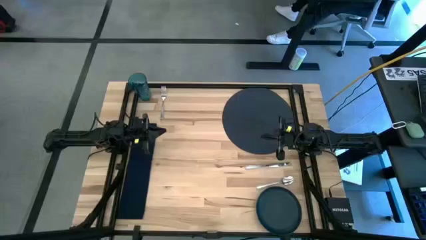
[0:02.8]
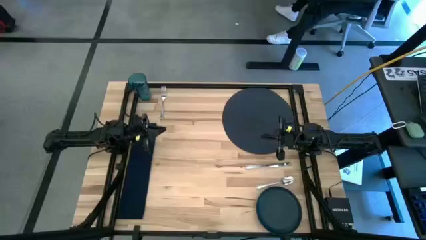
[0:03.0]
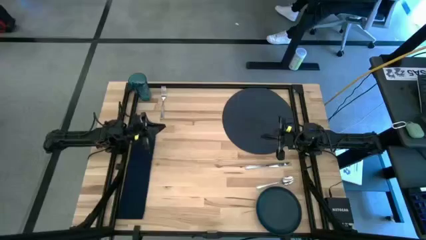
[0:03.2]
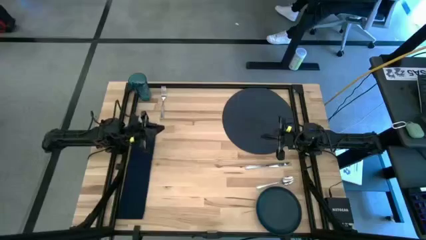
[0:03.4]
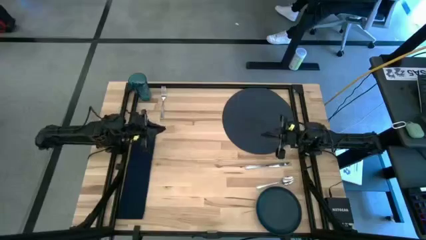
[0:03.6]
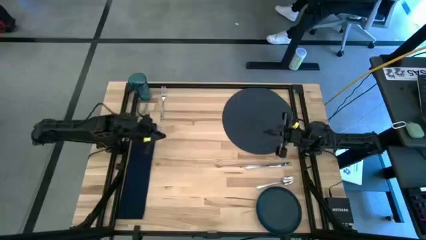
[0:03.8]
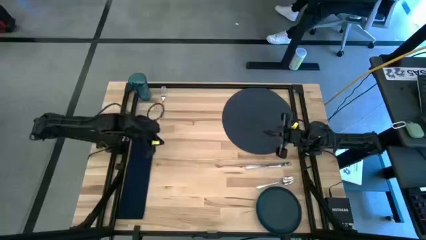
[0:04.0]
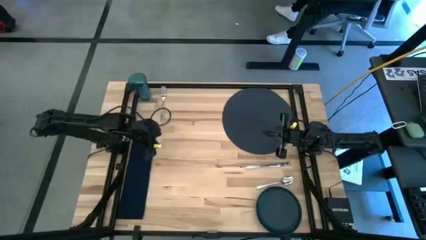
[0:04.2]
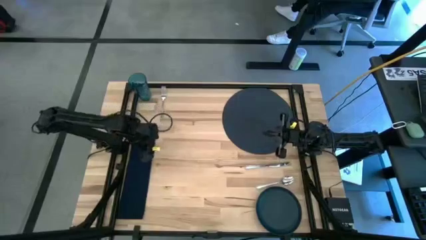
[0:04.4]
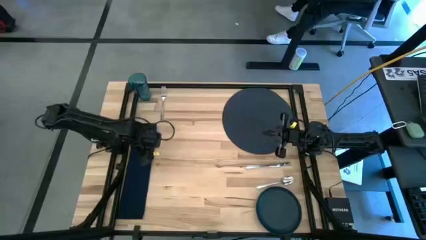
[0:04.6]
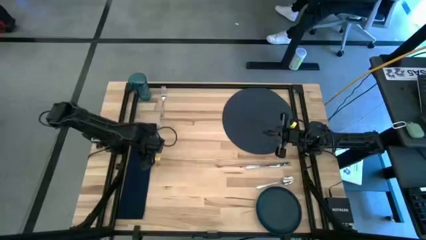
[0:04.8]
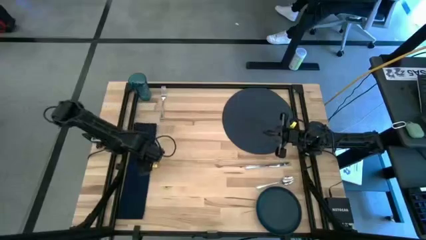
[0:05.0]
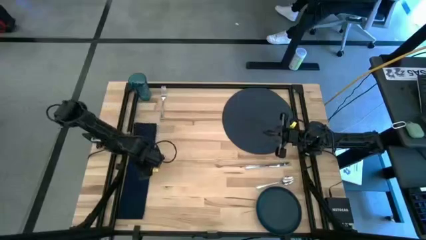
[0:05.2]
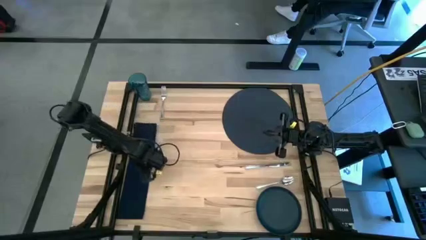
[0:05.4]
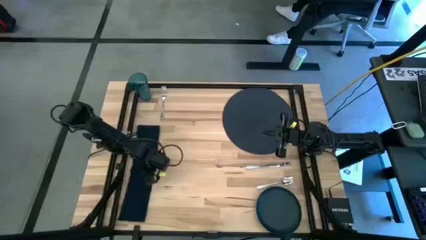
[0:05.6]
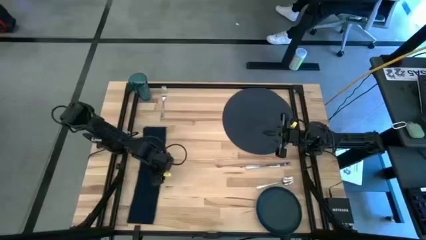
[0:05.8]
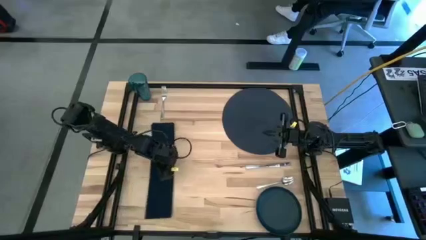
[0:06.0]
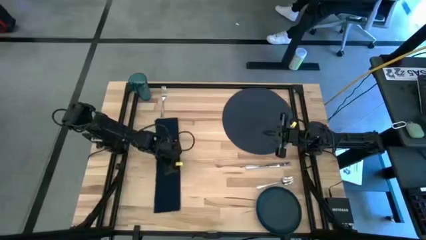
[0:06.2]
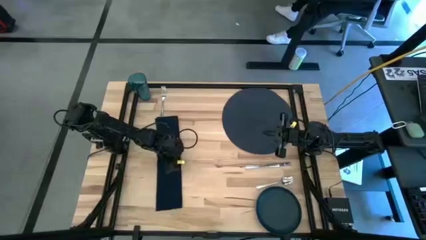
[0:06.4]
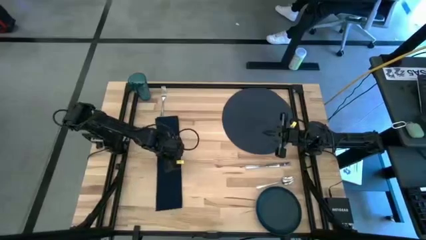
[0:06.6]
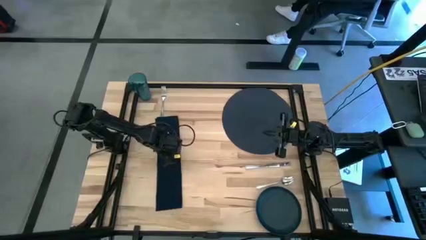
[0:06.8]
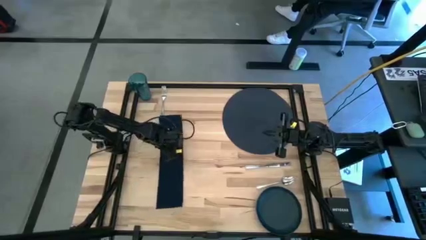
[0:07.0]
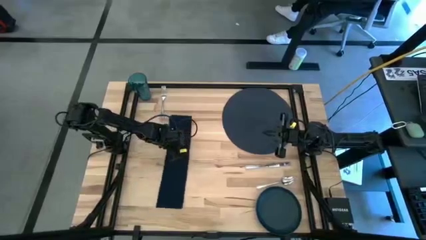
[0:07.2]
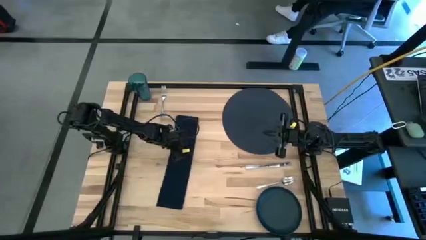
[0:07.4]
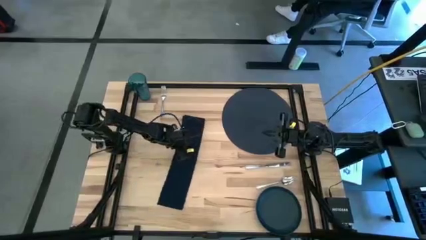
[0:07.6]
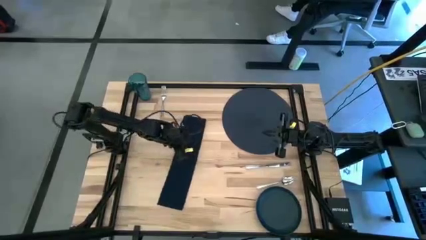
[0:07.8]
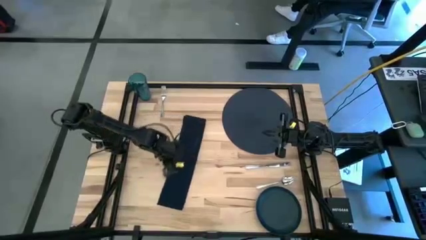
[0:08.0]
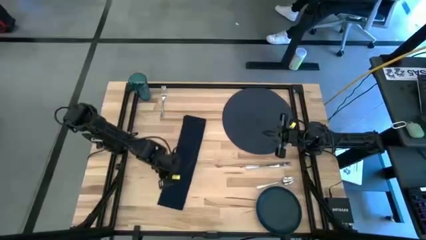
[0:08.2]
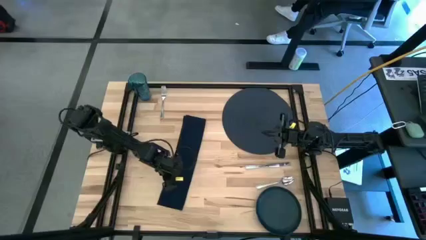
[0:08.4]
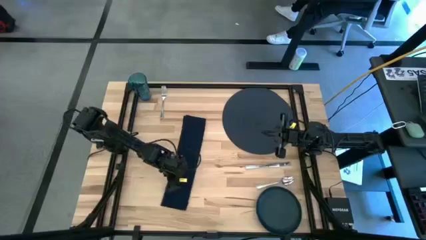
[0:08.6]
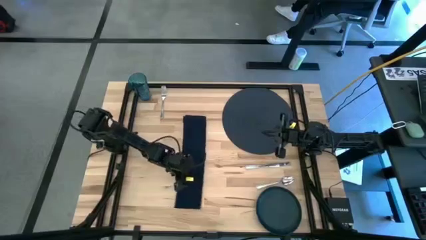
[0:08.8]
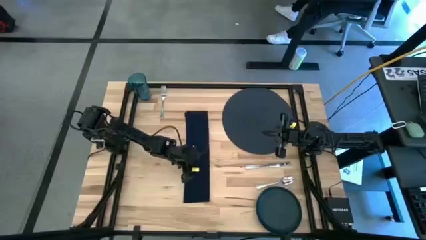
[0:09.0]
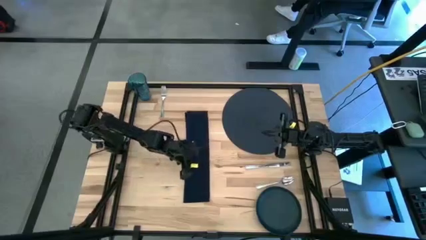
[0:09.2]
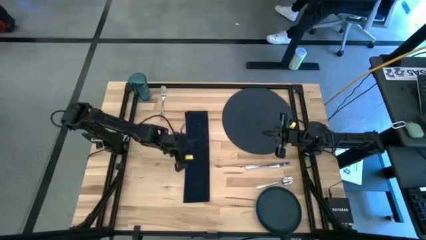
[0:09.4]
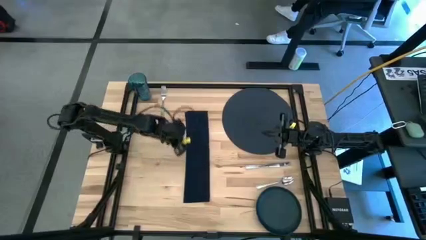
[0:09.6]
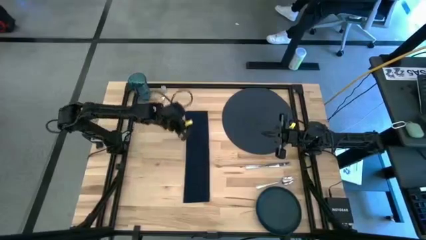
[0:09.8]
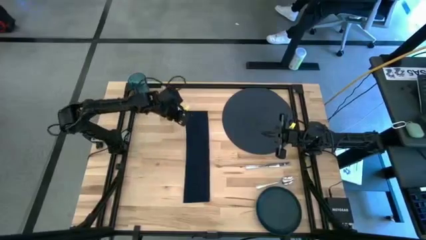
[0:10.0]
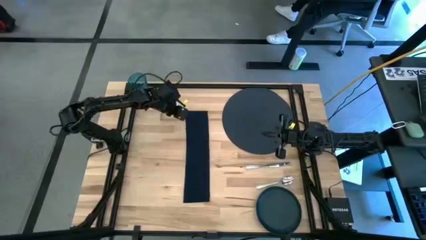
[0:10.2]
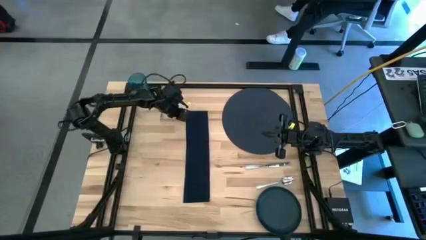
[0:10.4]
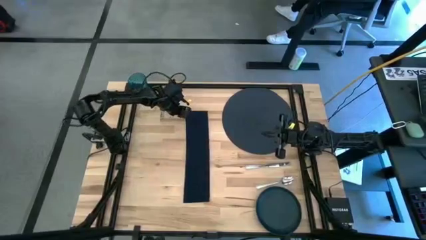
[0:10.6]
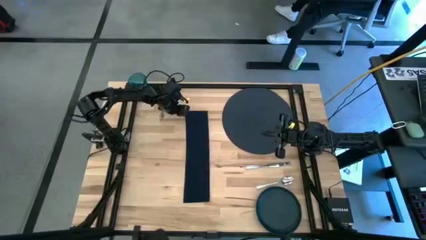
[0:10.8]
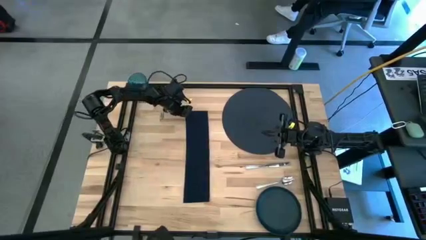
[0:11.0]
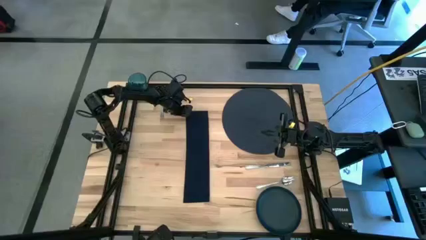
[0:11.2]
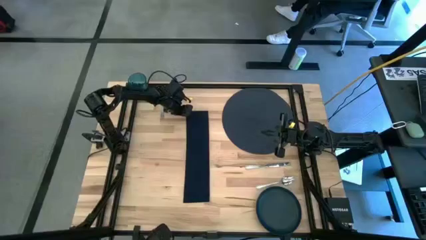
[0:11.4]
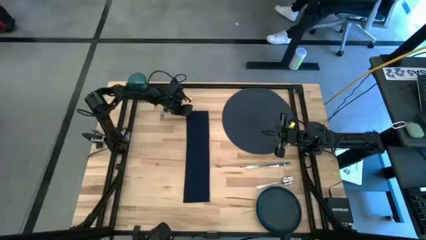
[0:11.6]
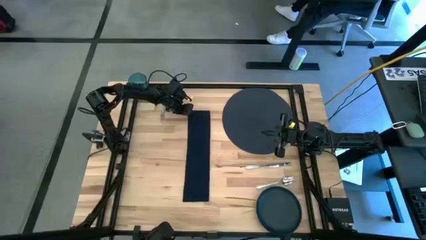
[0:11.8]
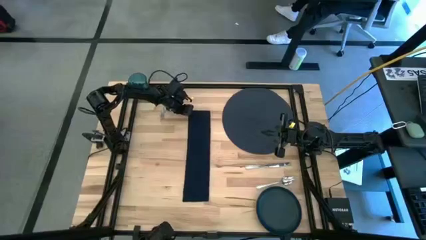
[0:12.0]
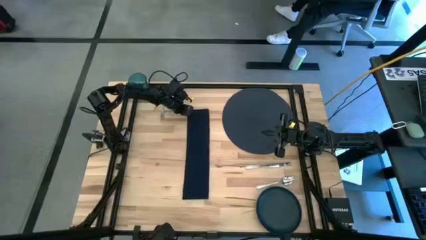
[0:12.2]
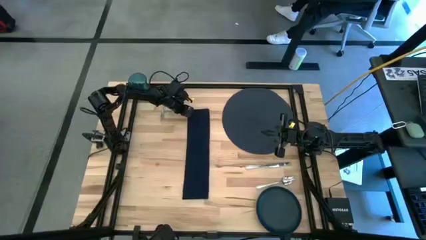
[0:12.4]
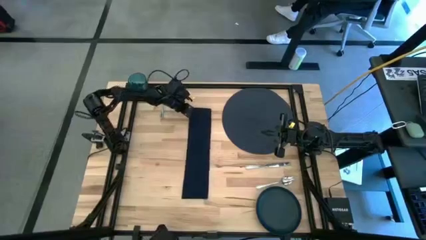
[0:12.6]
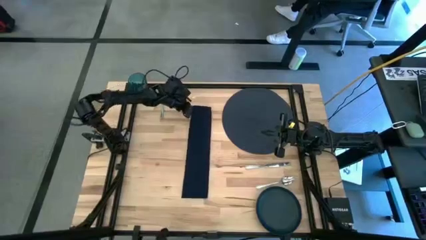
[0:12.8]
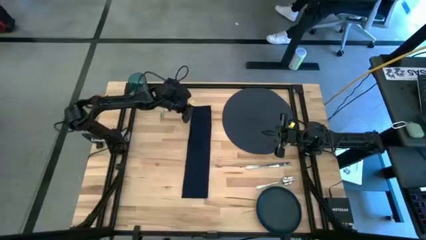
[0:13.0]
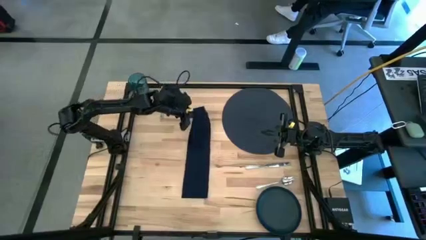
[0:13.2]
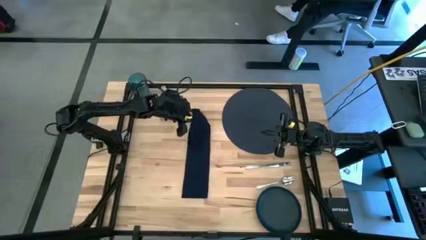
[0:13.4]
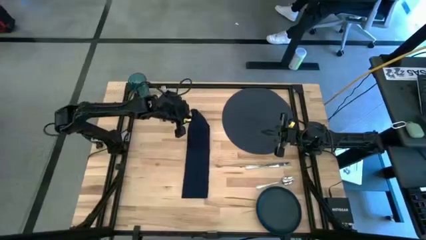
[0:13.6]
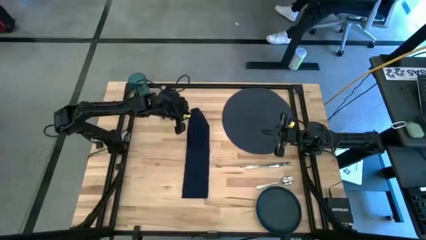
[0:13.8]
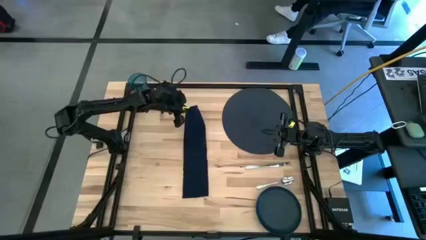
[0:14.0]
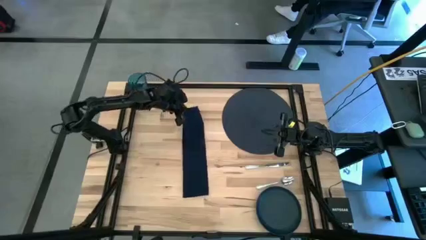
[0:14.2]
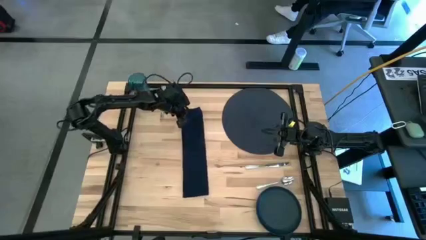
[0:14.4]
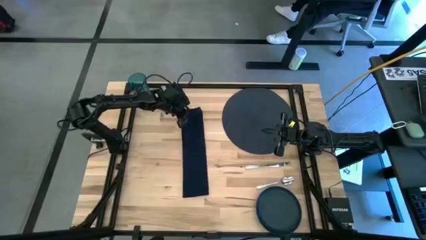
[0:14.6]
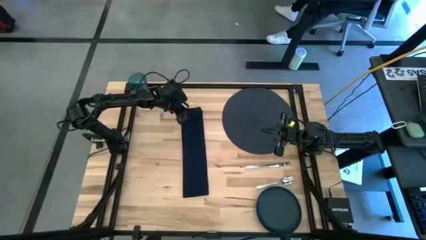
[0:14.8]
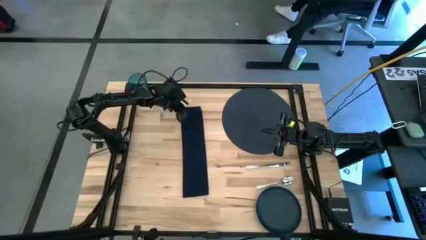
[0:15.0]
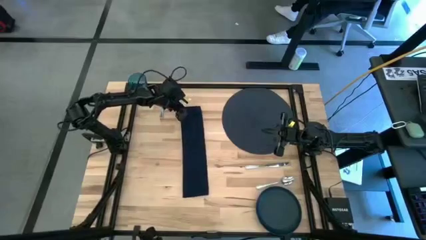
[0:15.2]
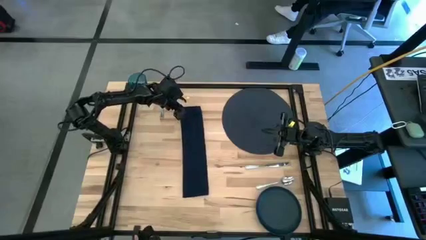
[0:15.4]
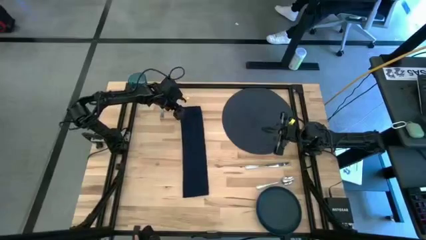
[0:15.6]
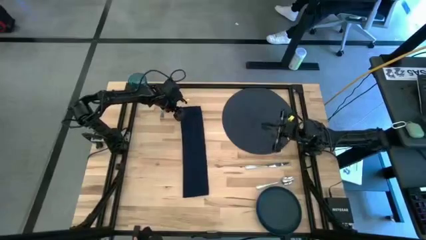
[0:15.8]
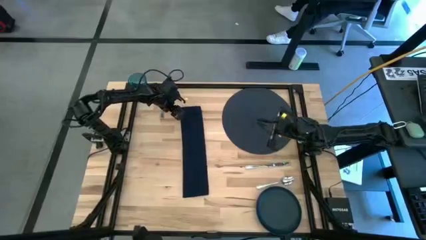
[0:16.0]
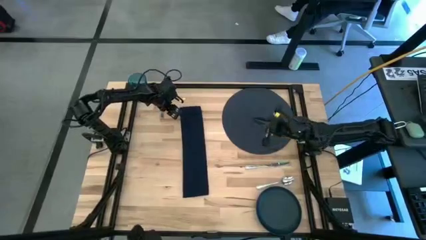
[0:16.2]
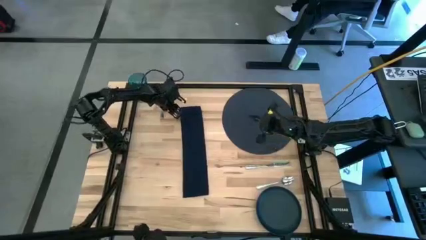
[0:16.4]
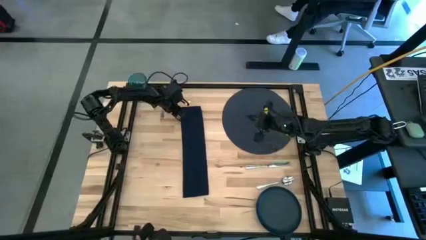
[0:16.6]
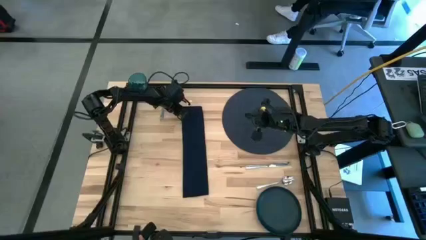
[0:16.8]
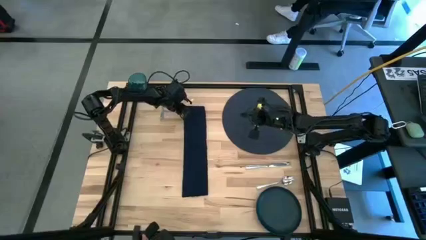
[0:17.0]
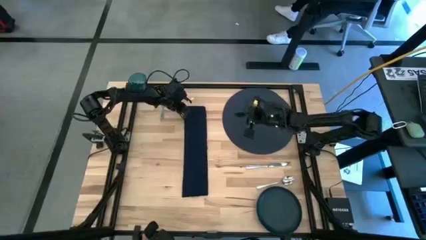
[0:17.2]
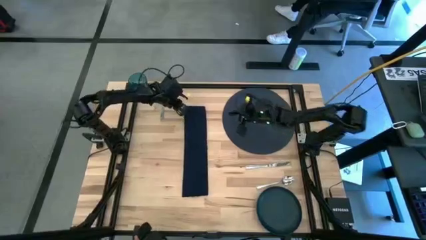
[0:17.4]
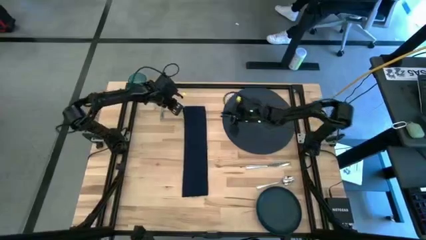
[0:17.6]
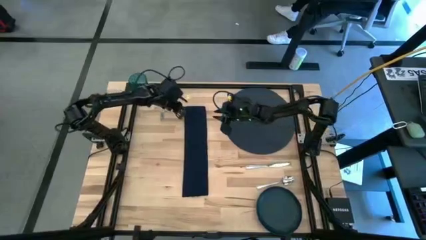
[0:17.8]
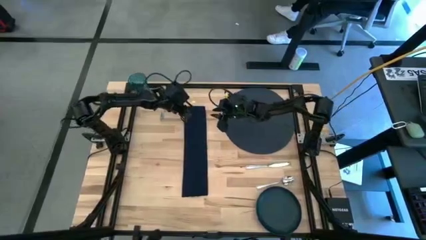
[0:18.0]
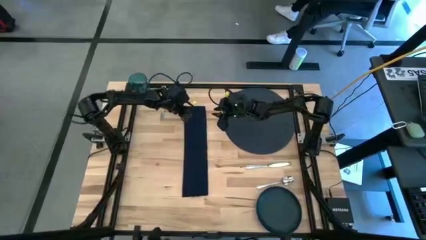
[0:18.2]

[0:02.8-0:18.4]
Task: Set table place
Fold the black table napkin
